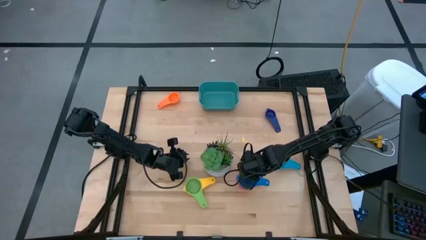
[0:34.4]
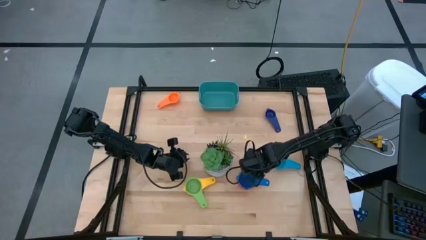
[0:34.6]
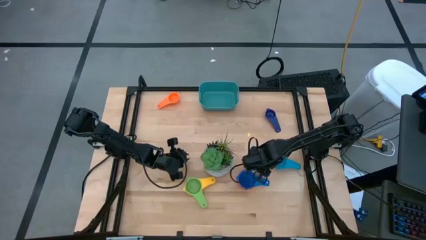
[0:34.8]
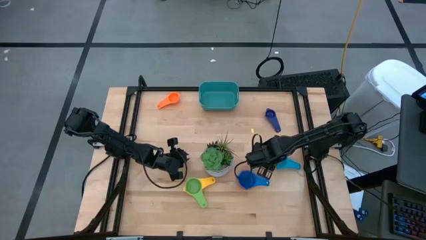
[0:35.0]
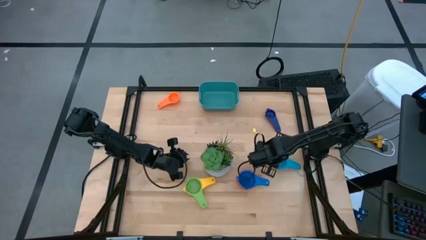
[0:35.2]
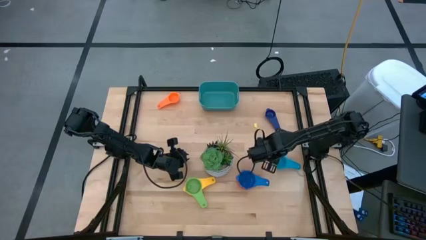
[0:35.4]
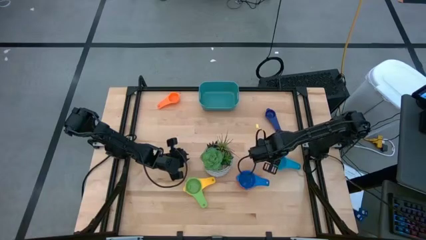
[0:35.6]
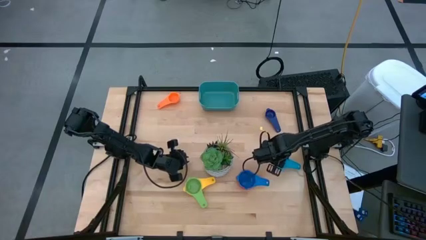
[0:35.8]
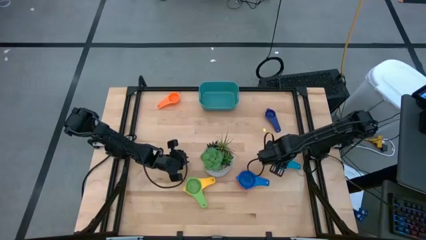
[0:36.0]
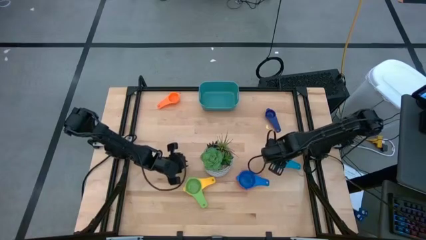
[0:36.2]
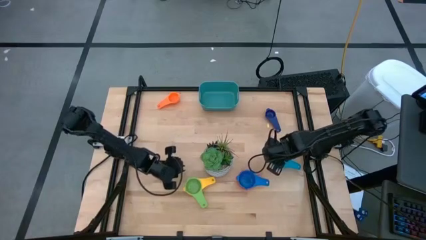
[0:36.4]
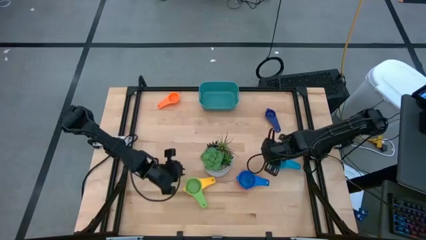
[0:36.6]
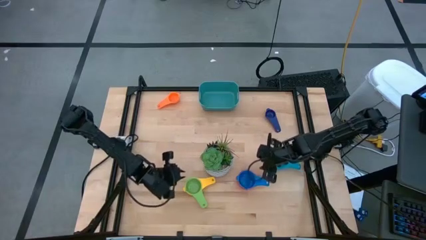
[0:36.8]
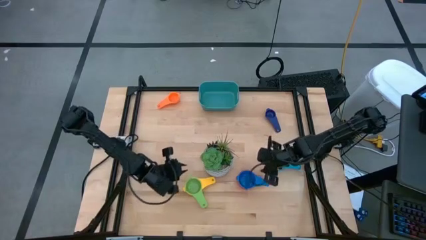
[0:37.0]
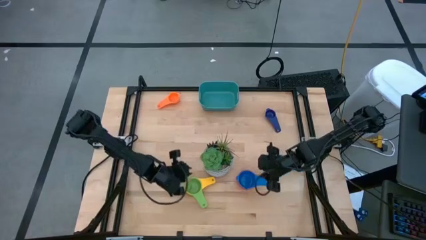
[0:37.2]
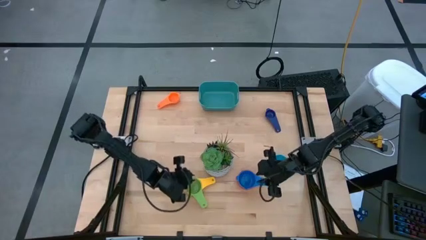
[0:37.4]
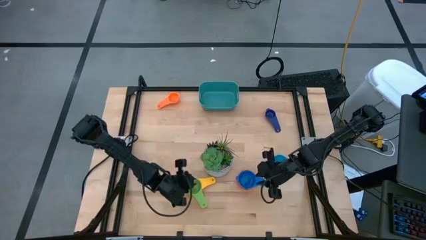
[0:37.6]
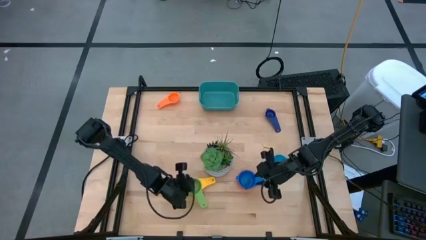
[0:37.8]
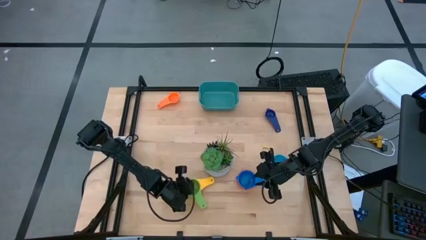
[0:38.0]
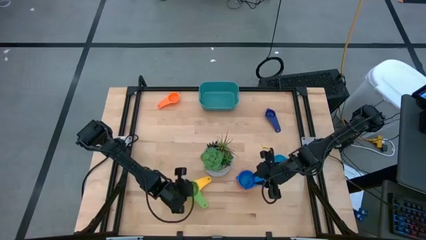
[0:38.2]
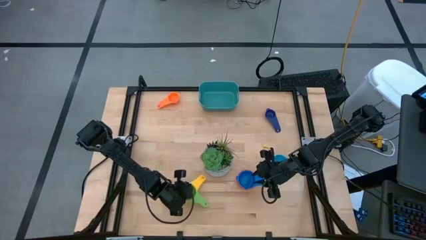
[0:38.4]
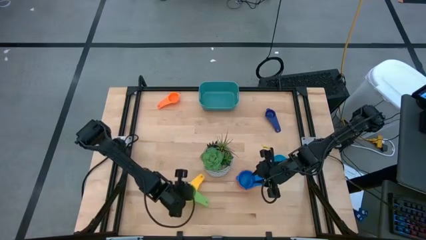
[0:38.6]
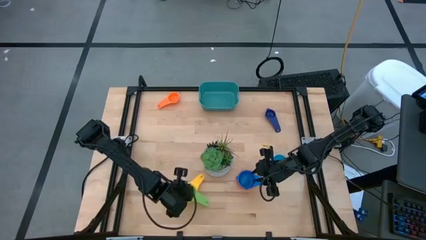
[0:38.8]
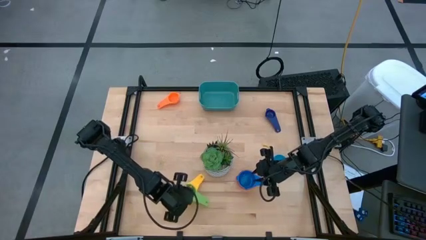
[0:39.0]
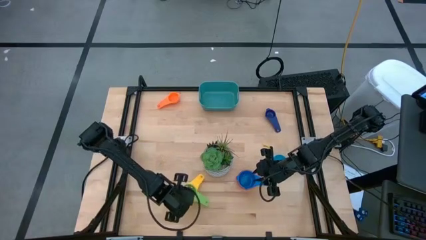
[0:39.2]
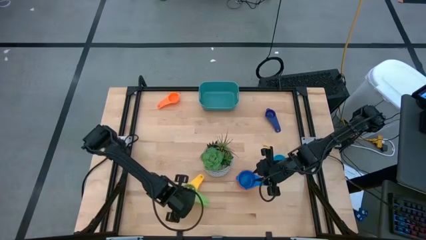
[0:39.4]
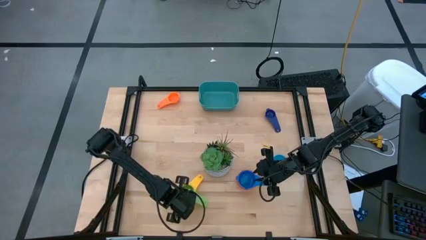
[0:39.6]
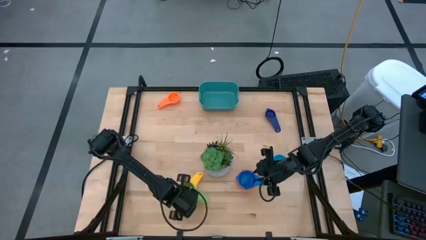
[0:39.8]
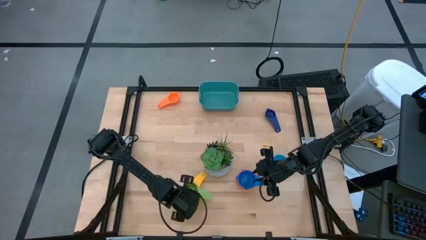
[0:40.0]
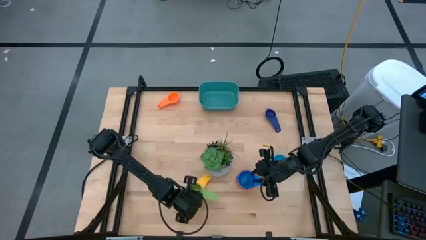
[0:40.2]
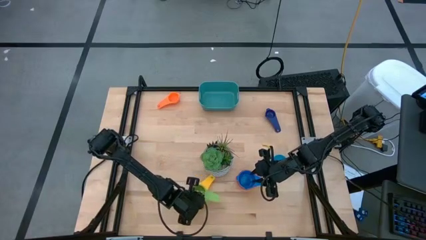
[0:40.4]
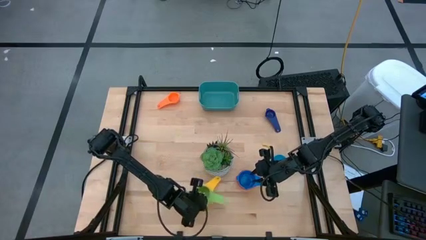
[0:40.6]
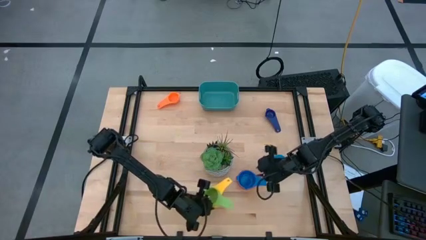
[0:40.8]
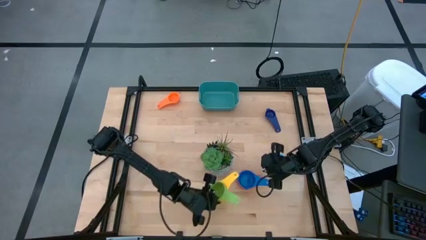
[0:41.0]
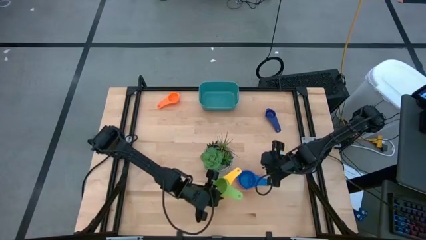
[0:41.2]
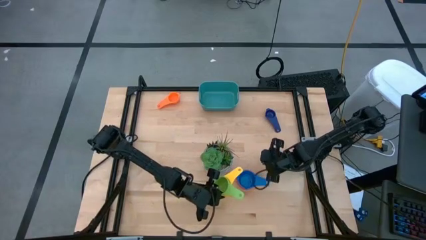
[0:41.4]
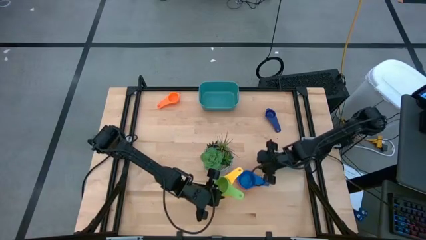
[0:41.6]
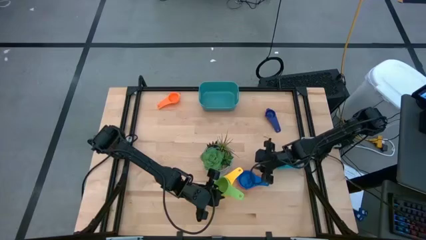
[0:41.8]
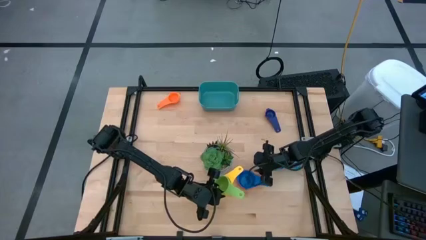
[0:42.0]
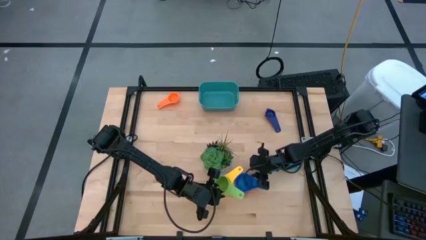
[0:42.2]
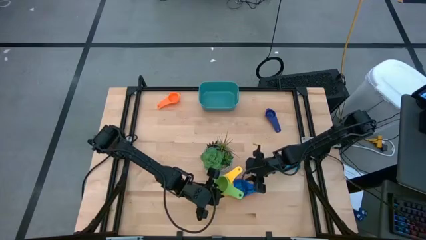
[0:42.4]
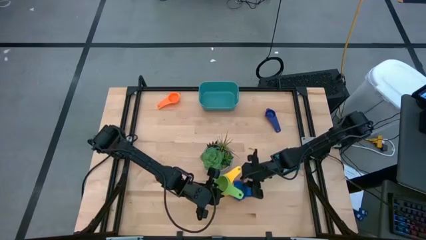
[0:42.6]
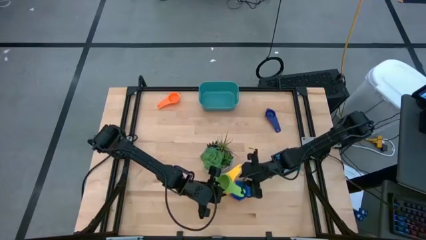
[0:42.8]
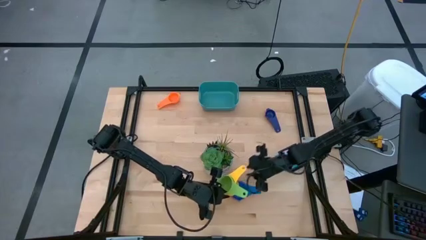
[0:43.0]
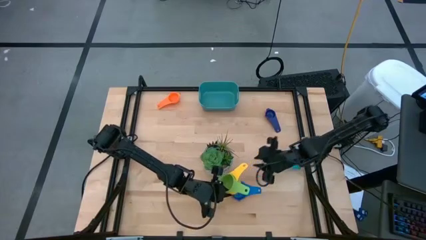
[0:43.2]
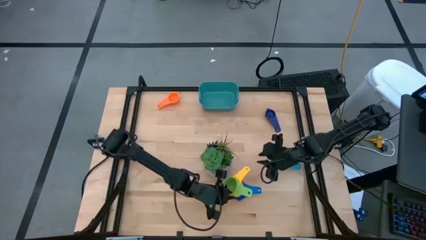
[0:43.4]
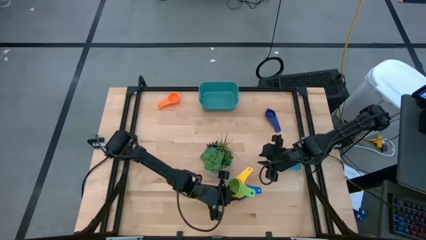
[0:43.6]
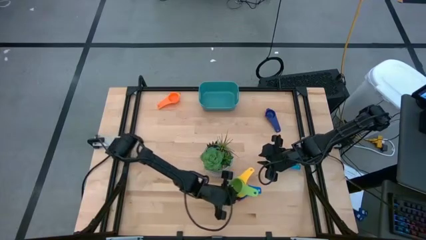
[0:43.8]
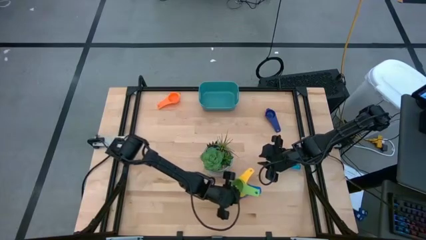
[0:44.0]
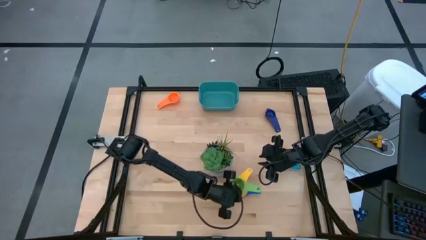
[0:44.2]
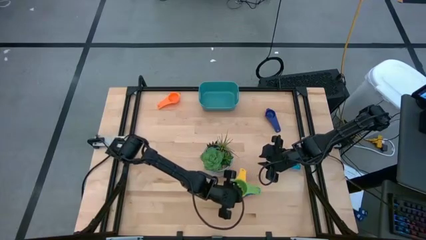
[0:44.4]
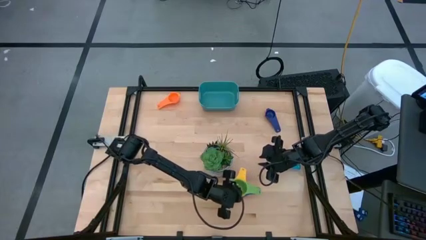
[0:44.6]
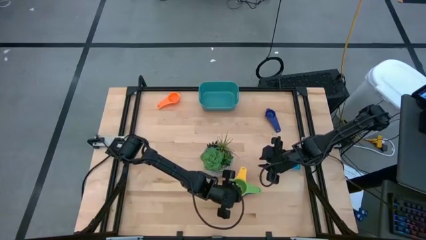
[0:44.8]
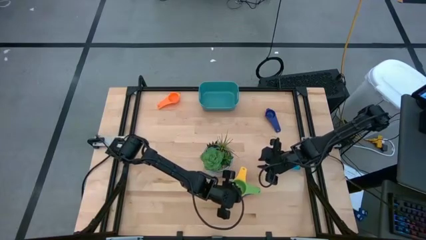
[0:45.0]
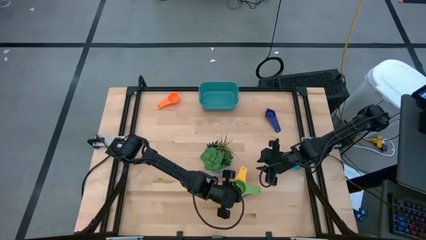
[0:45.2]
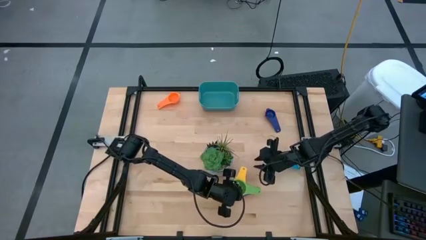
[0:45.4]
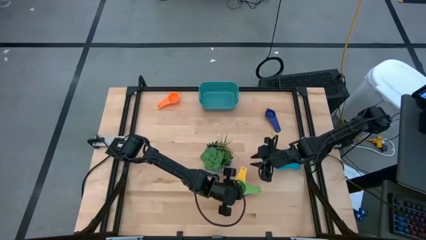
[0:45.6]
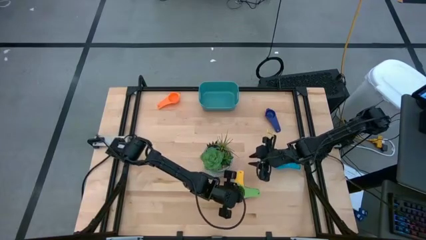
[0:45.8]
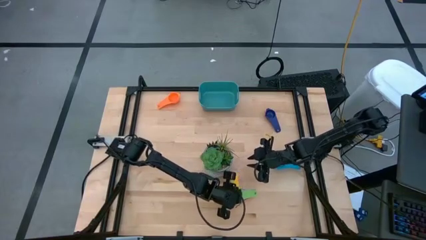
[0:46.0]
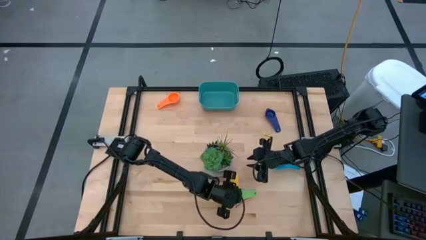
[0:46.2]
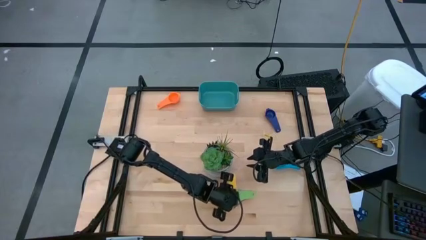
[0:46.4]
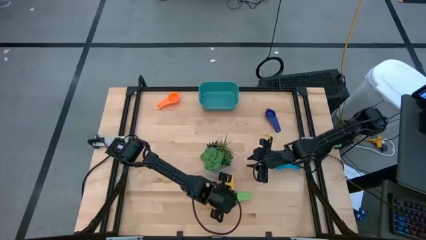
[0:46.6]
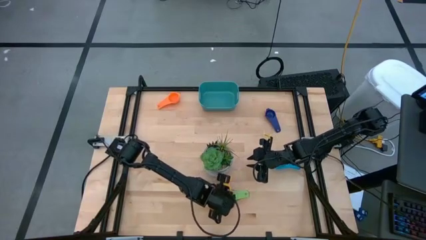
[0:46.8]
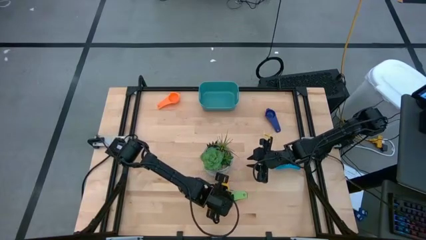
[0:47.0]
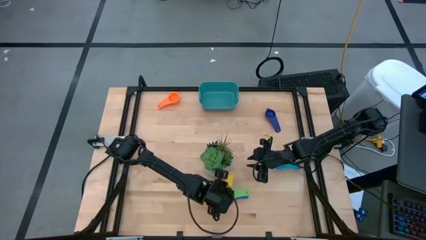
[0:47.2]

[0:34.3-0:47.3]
Task: Nest measuring cups in basket
Stack the nested measuring cups on top of the blue measuring cup
